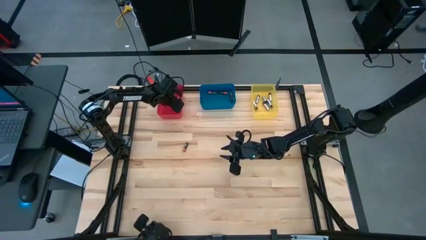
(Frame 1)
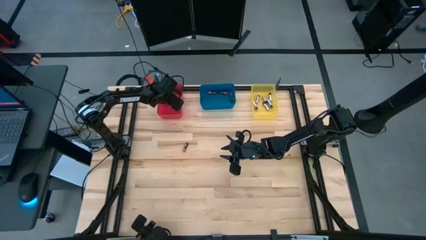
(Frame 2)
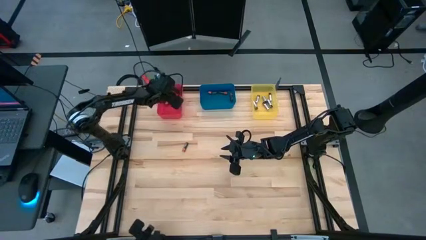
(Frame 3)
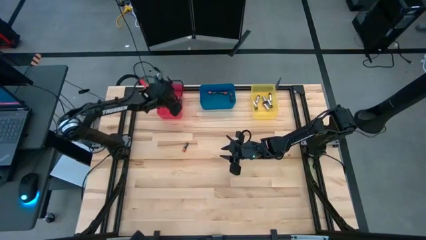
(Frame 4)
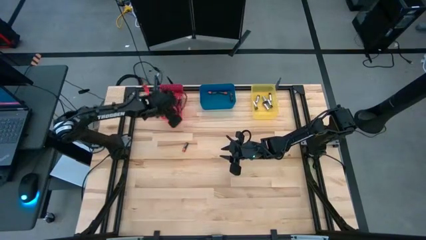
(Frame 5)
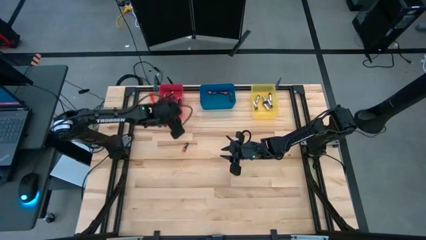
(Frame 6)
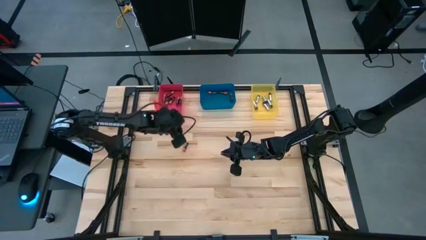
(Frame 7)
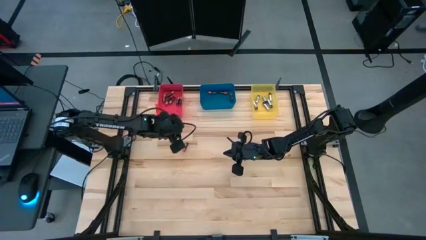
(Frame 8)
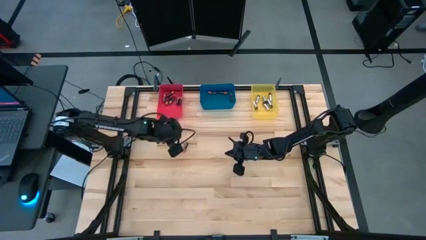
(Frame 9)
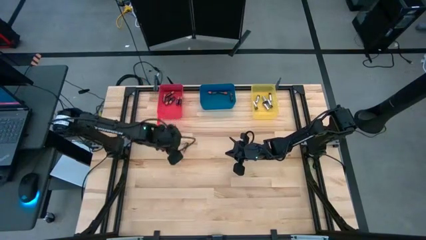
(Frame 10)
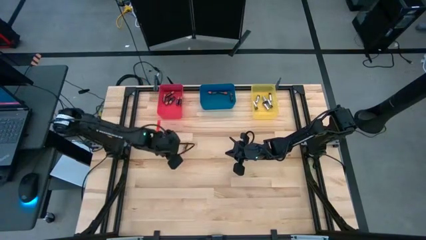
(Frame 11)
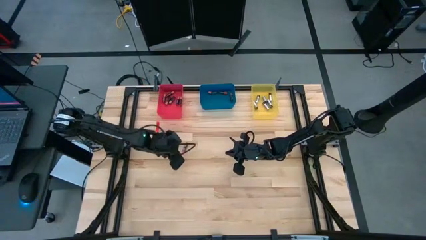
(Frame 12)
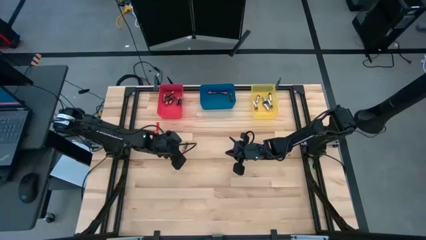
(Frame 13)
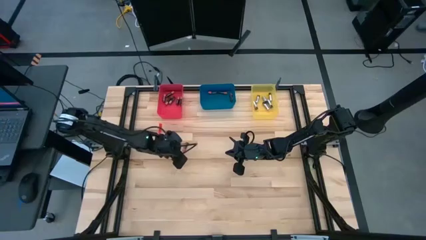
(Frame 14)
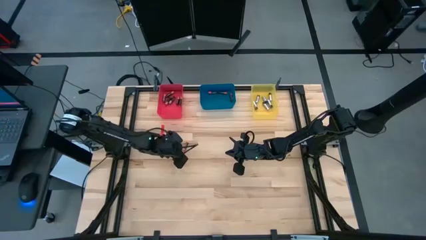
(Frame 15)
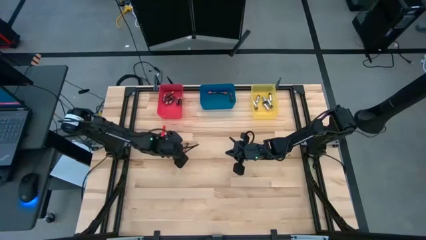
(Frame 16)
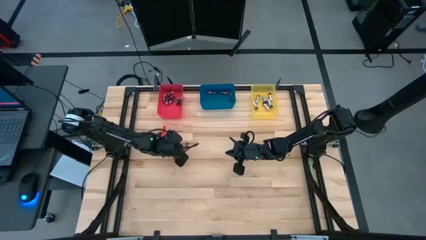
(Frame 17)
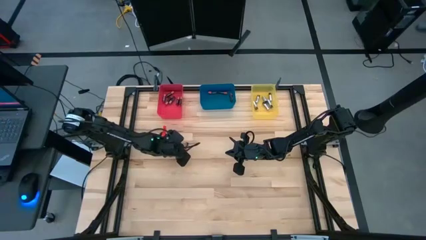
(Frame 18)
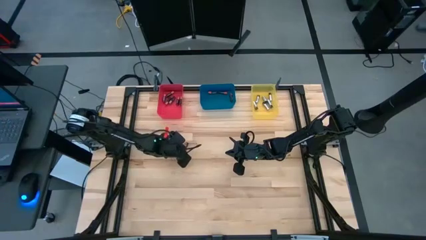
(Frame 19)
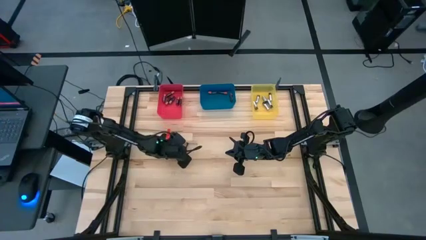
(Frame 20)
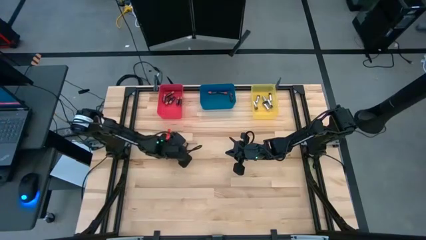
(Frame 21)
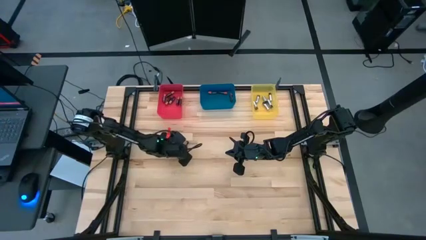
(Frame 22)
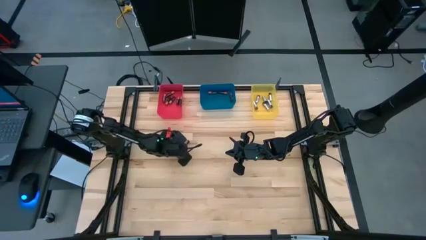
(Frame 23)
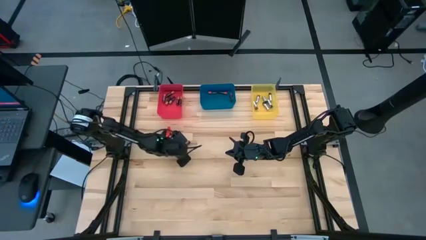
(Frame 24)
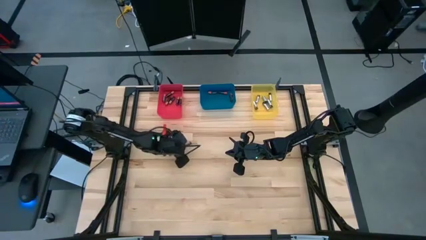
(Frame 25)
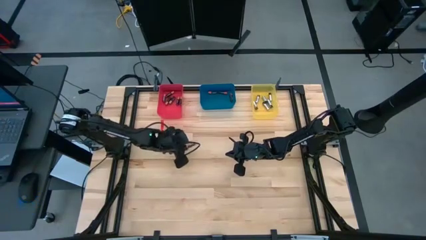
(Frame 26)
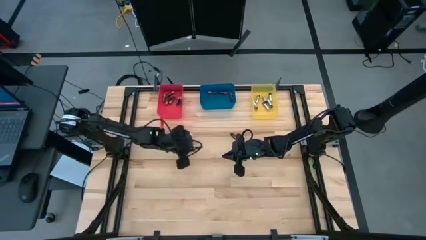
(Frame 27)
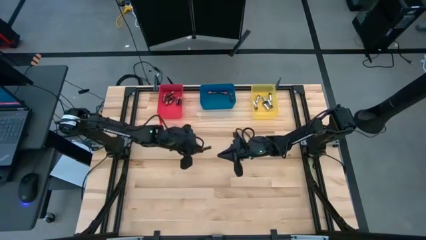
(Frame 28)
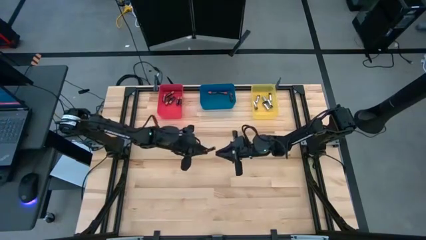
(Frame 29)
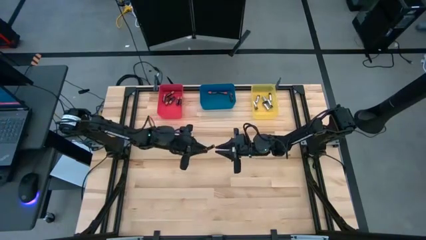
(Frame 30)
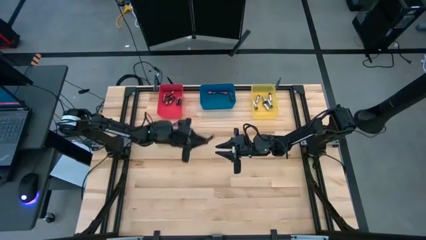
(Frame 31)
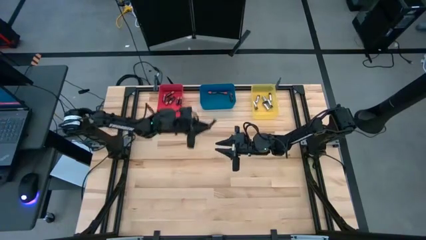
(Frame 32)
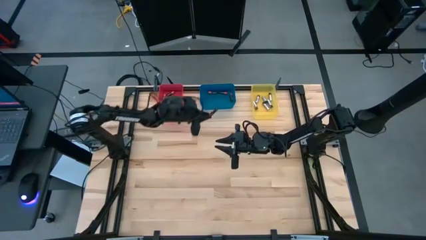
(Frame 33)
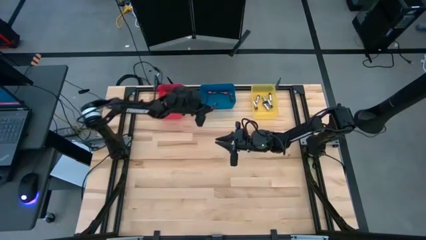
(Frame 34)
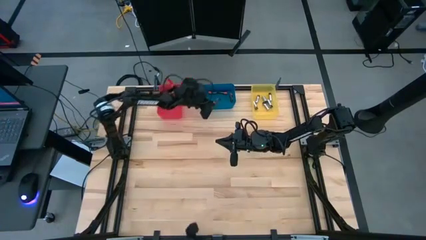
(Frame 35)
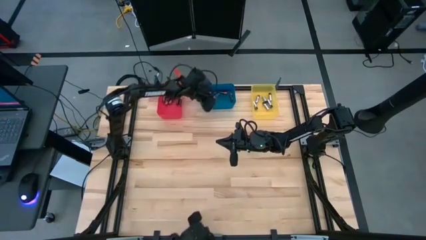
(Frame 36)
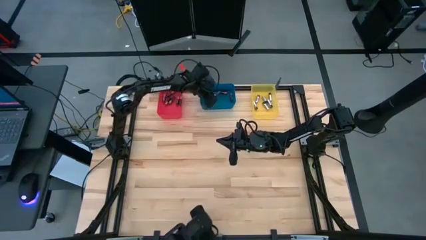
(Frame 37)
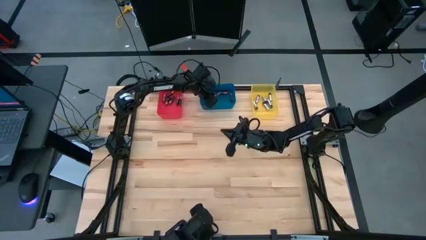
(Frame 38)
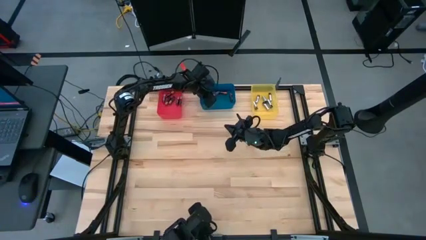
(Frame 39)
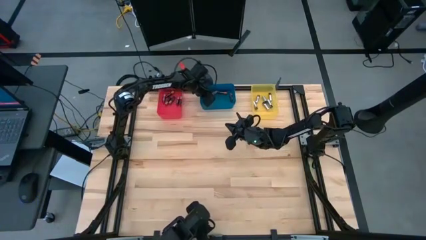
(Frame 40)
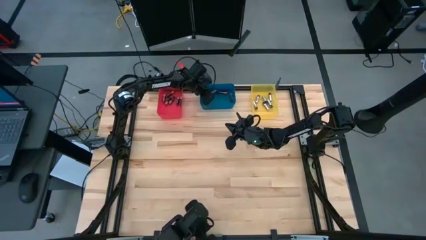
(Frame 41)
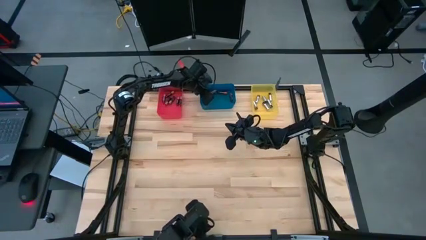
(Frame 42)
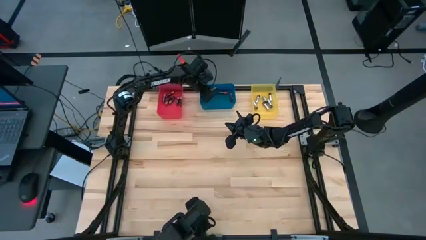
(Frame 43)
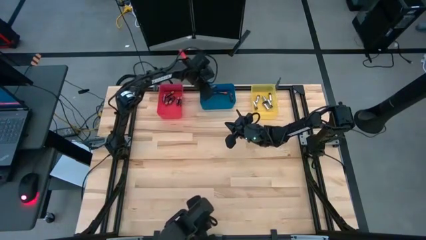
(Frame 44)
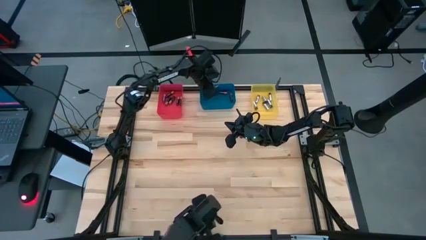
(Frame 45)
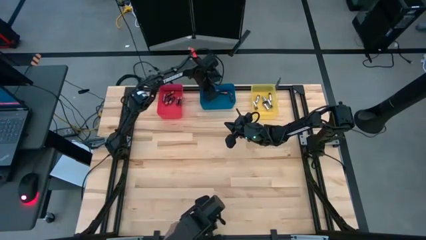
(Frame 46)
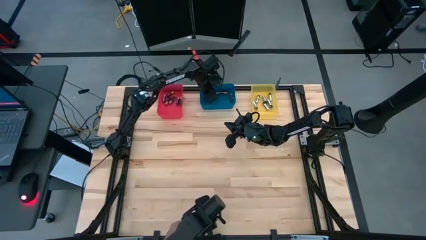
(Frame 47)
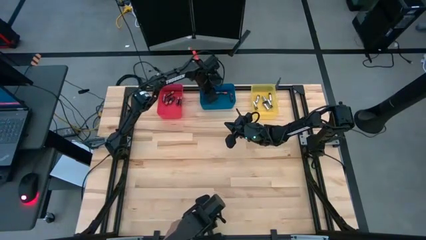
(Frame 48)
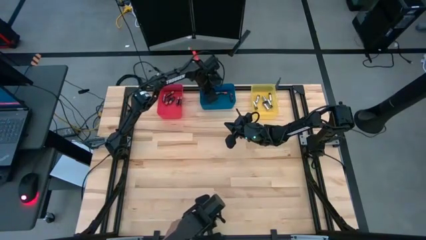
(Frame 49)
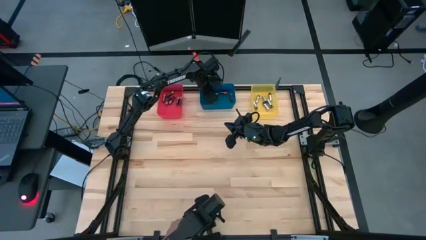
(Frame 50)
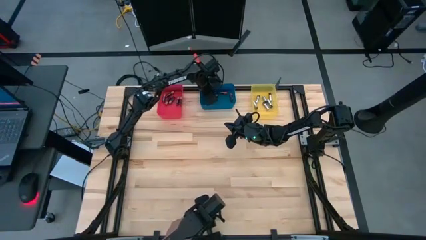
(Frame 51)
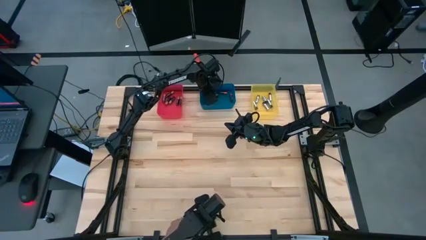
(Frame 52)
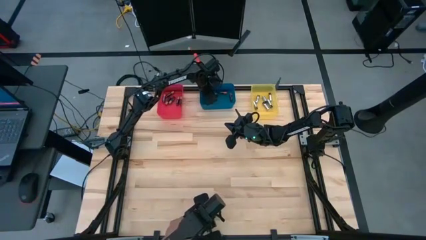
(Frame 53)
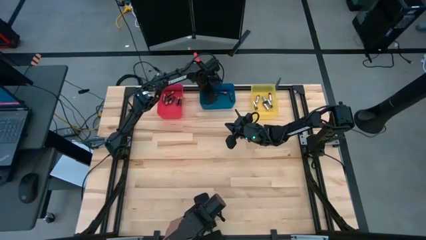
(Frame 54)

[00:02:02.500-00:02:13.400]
Task: Sort batteries
Put the orange battery into the blue bin

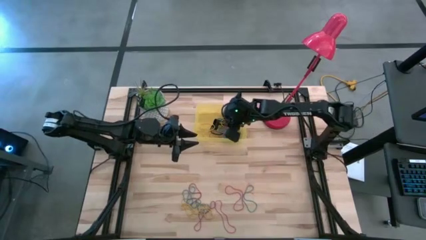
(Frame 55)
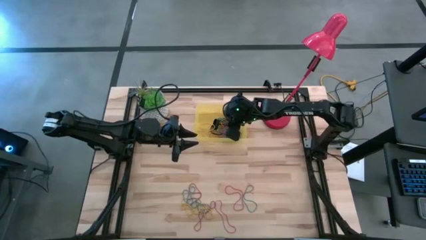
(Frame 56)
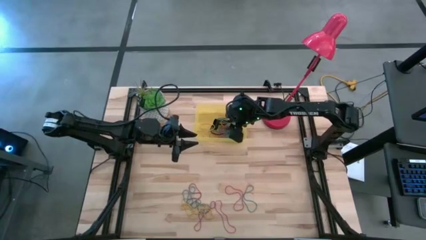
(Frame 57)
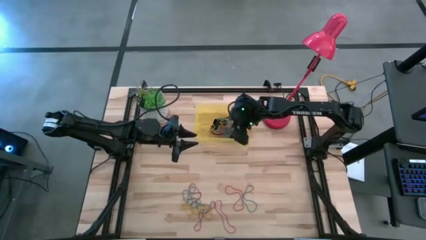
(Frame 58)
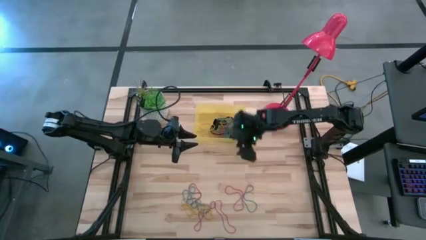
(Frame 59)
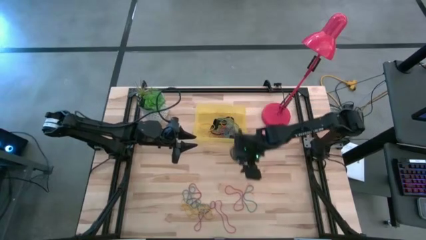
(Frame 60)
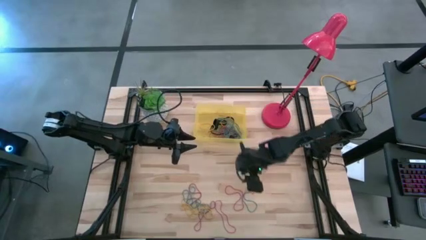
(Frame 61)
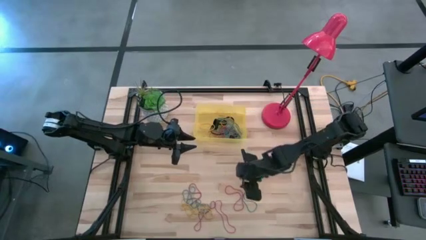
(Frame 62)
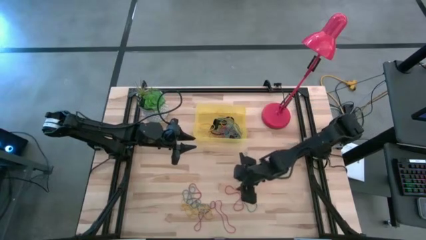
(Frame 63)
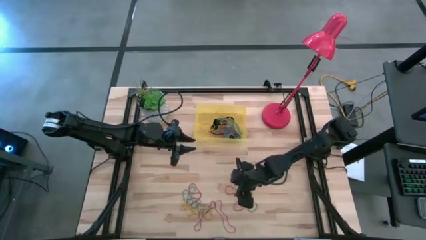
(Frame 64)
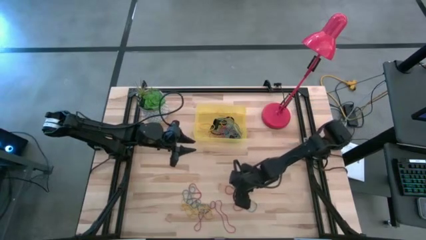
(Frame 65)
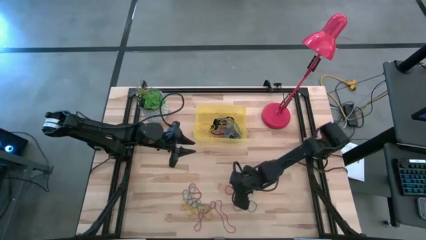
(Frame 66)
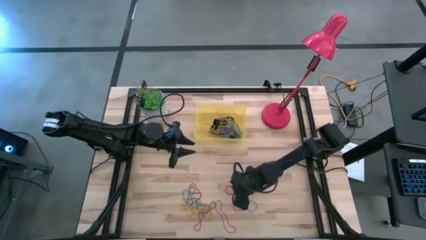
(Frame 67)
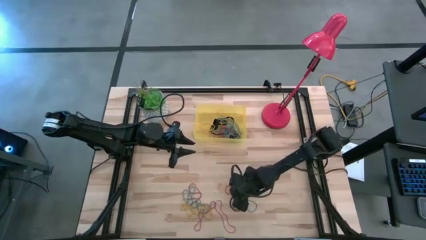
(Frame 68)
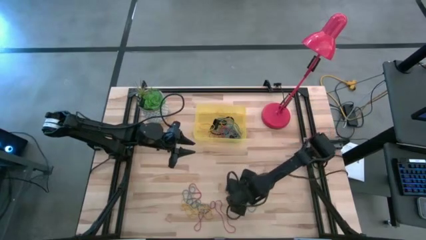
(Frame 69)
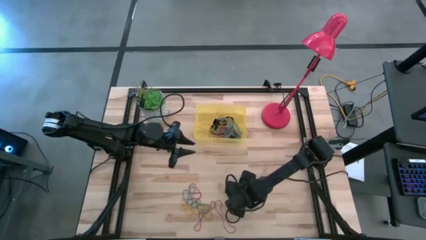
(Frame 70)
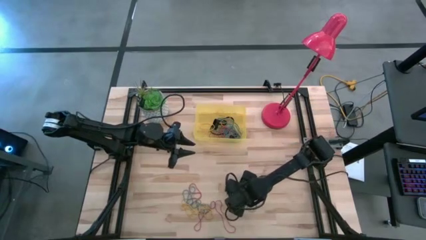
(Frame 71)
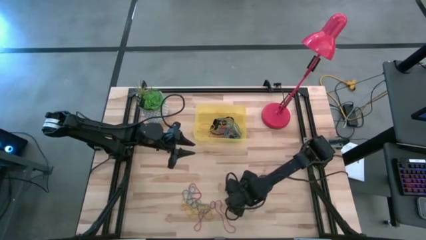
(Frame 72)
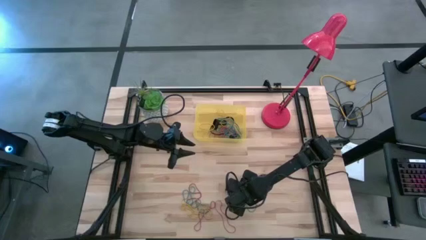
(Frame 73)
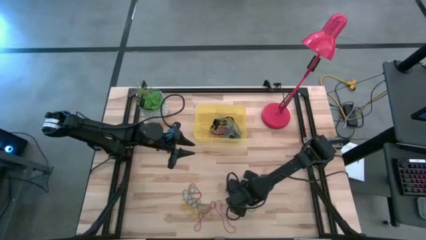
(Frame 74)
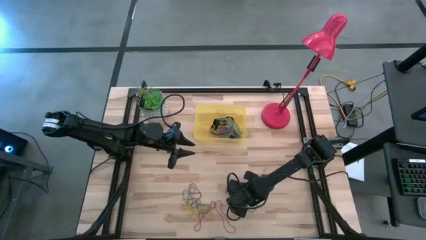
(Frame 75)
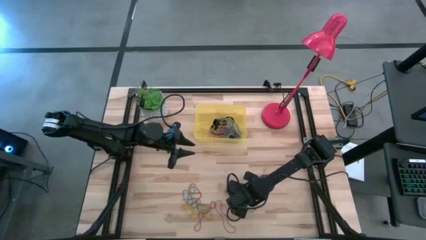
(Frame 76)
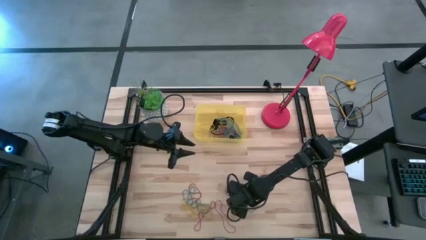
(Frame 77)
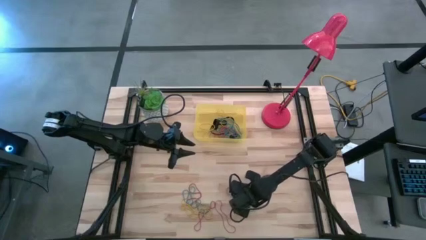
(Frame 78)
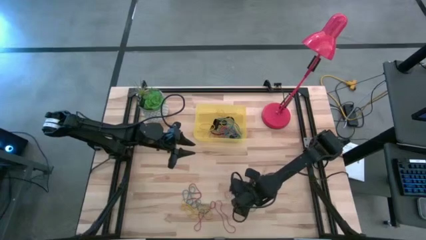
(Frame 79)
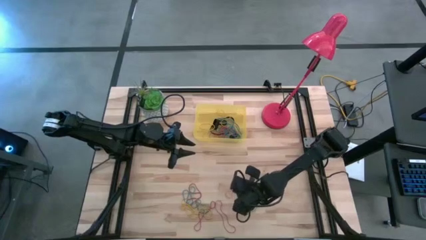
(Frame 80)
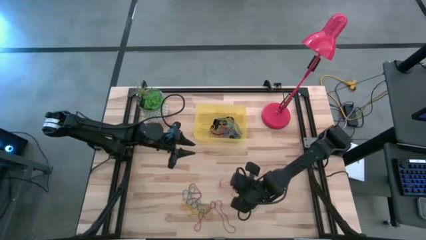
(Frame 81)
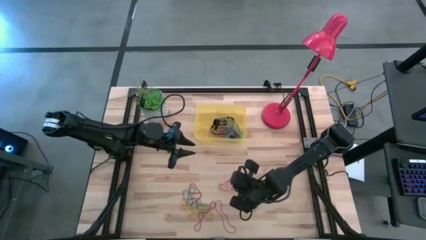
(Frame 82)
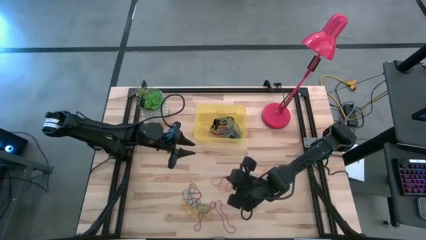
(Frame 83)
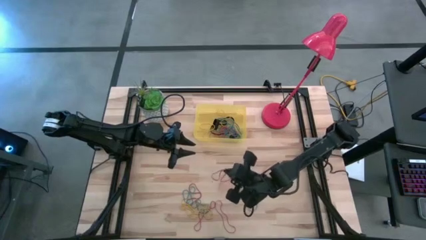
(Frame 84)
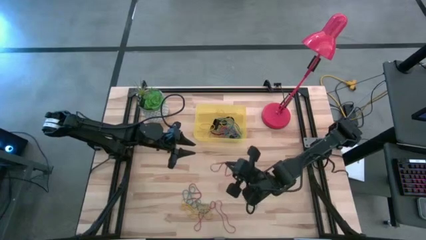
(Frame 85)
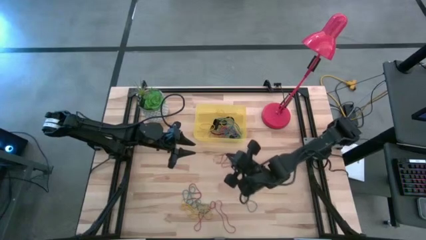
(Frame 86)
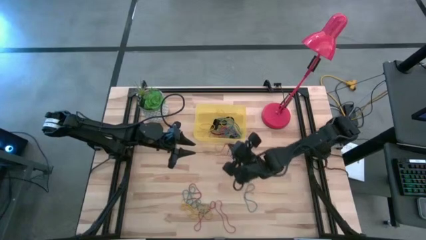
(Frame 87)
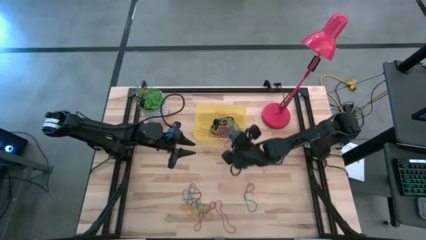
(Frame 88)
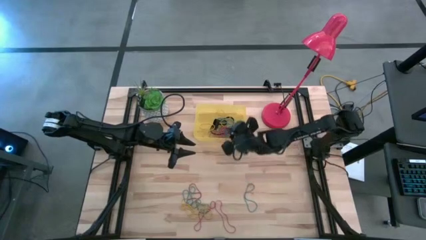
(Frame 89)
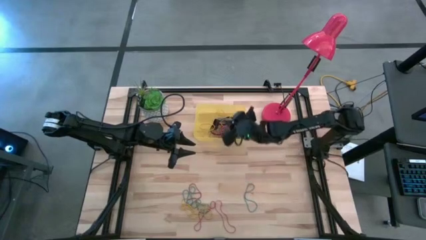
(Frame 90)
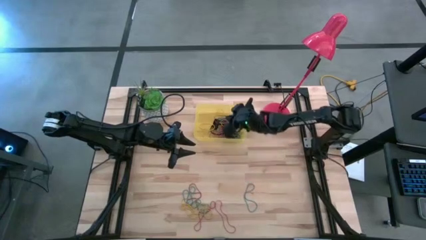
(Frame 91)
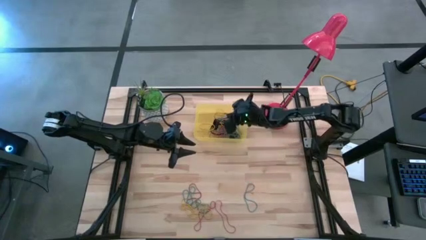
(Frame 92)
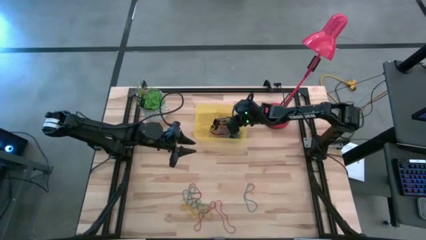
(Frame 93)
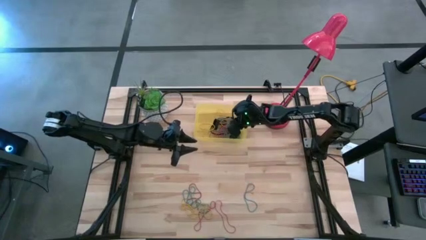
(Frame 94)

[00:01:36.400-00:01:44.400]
Task: Pick and place rubber bands into bin
Put the red rubber band into the yellow bin
